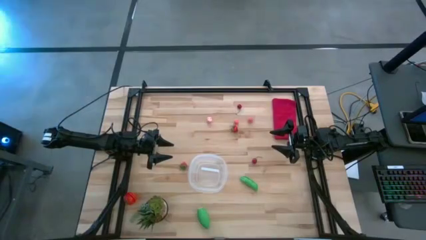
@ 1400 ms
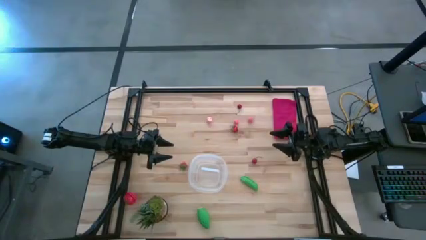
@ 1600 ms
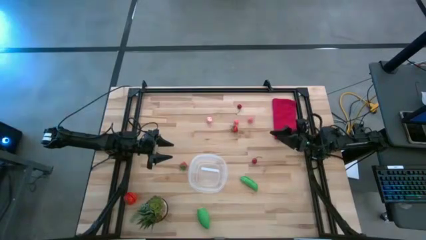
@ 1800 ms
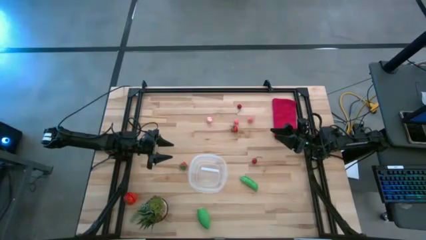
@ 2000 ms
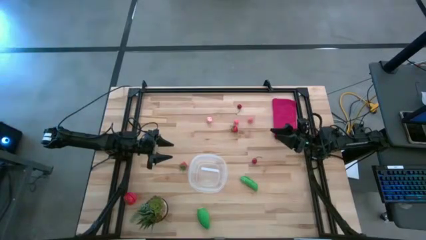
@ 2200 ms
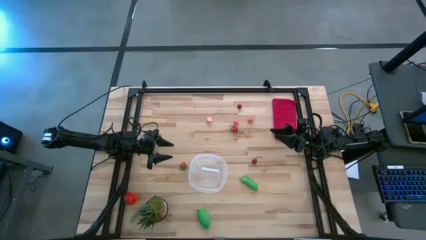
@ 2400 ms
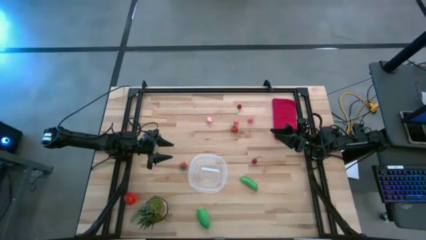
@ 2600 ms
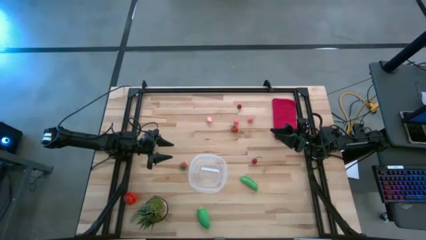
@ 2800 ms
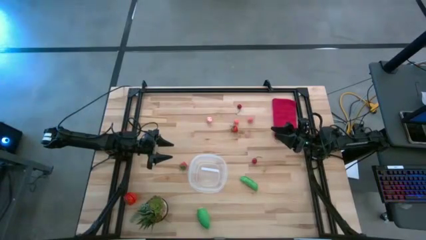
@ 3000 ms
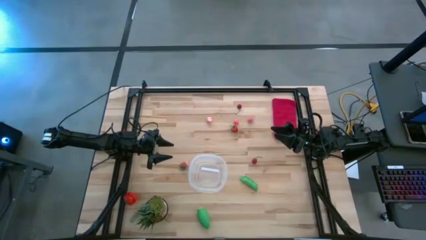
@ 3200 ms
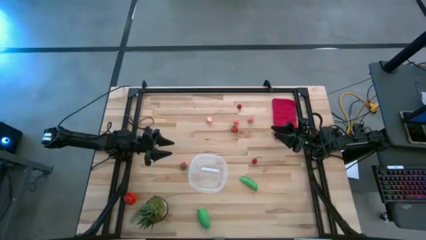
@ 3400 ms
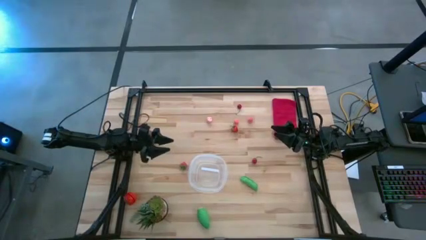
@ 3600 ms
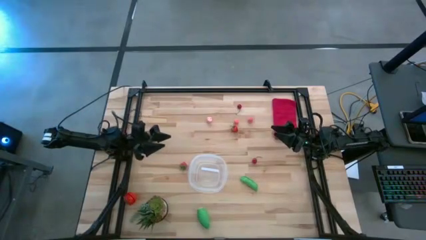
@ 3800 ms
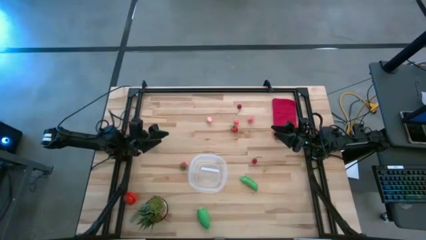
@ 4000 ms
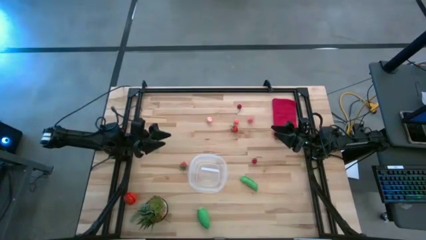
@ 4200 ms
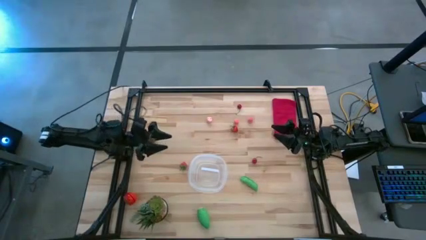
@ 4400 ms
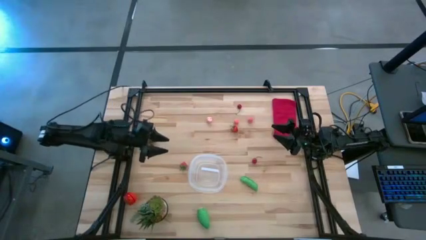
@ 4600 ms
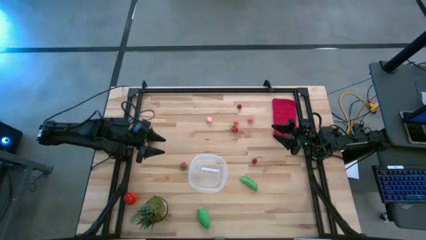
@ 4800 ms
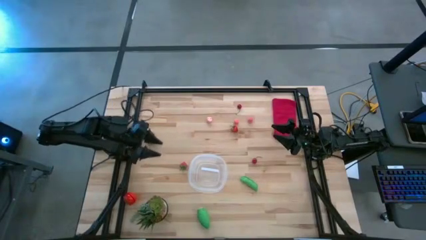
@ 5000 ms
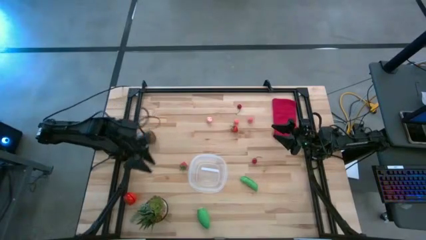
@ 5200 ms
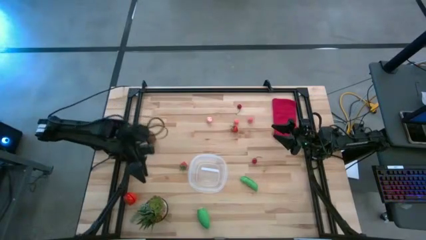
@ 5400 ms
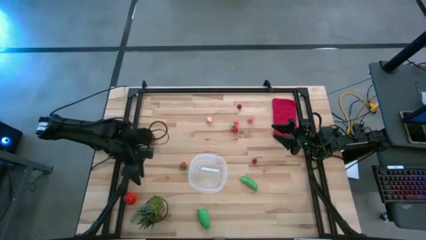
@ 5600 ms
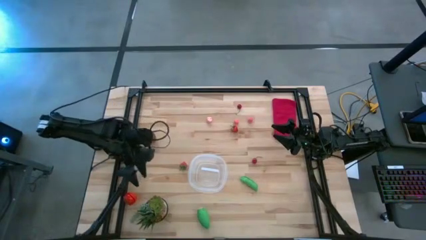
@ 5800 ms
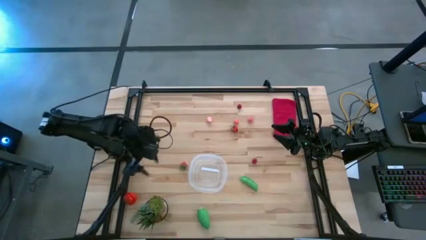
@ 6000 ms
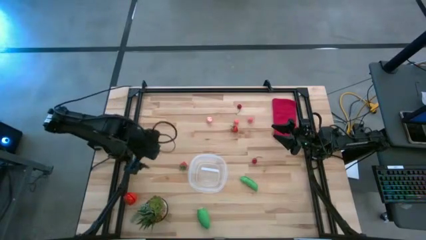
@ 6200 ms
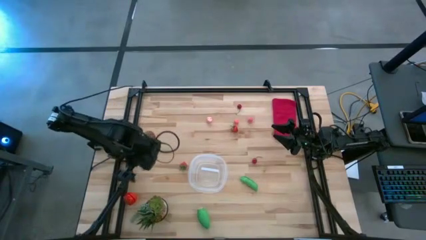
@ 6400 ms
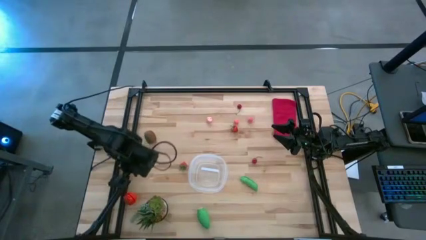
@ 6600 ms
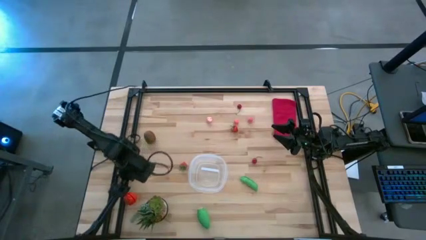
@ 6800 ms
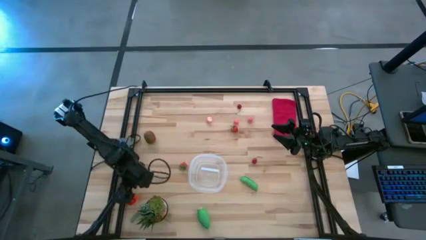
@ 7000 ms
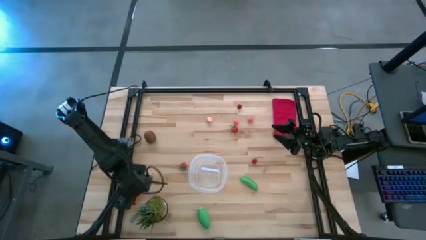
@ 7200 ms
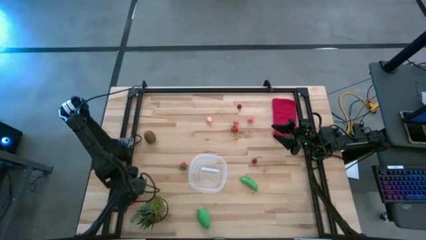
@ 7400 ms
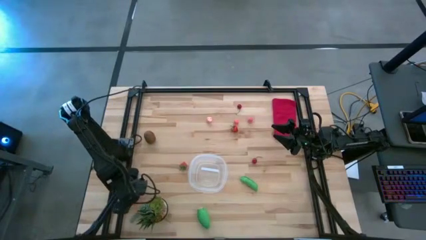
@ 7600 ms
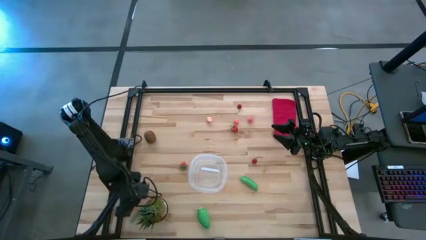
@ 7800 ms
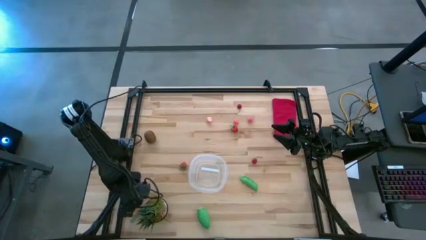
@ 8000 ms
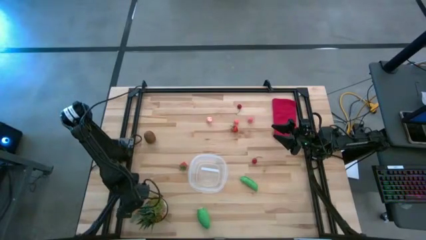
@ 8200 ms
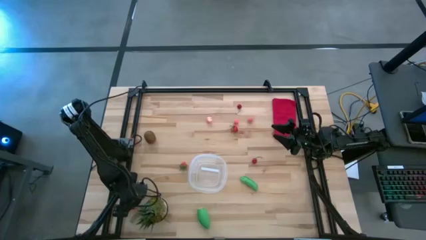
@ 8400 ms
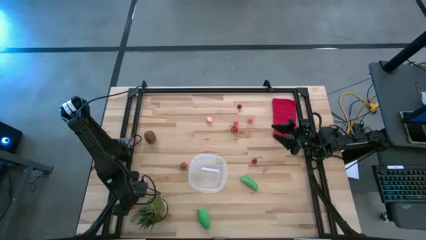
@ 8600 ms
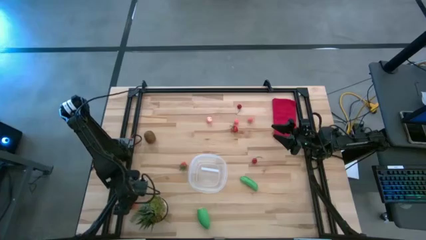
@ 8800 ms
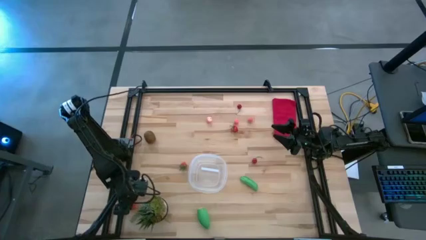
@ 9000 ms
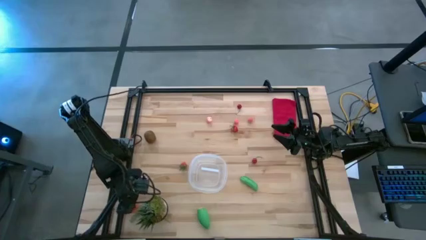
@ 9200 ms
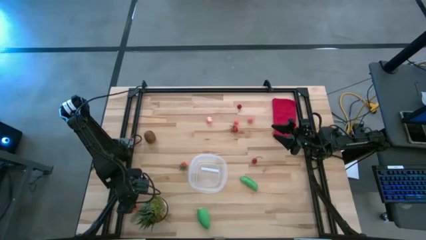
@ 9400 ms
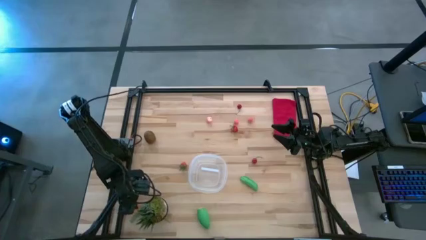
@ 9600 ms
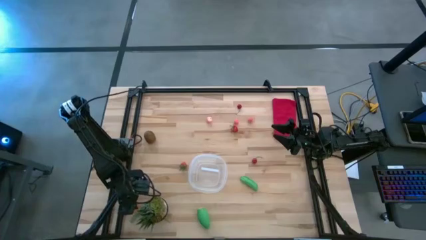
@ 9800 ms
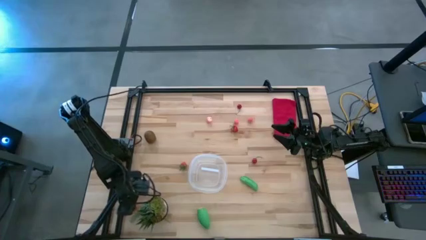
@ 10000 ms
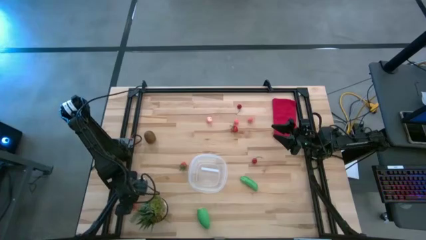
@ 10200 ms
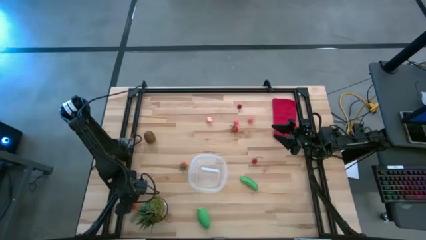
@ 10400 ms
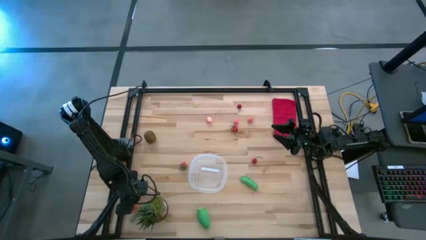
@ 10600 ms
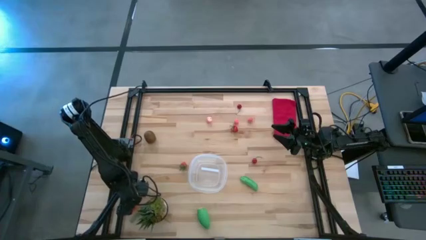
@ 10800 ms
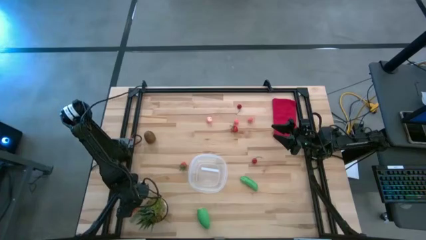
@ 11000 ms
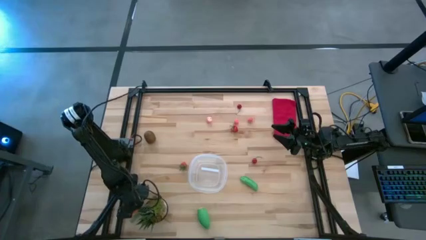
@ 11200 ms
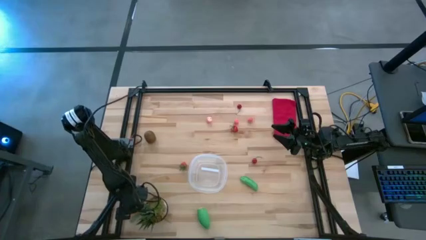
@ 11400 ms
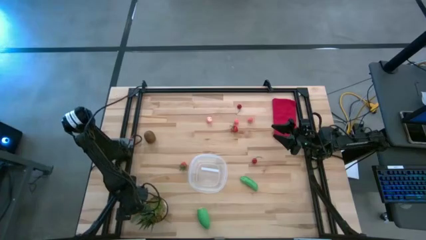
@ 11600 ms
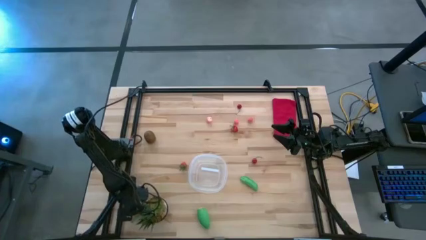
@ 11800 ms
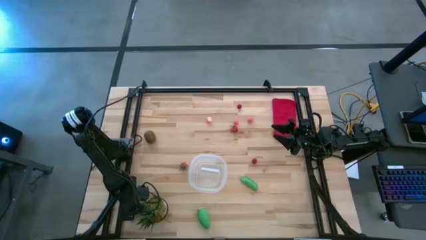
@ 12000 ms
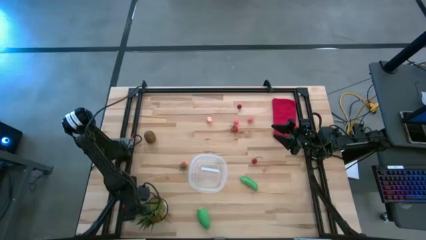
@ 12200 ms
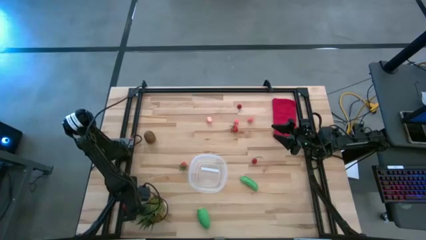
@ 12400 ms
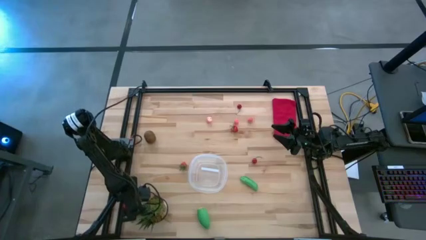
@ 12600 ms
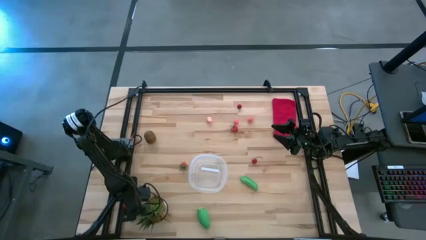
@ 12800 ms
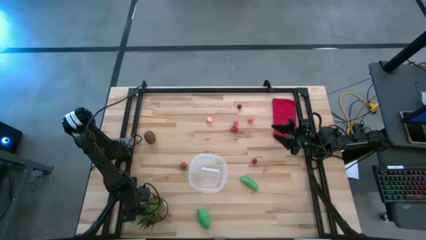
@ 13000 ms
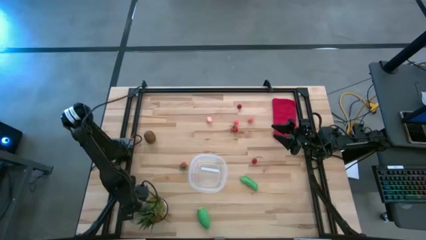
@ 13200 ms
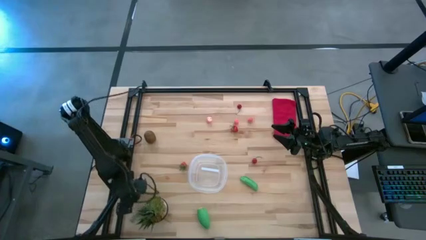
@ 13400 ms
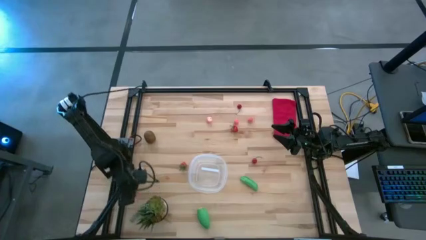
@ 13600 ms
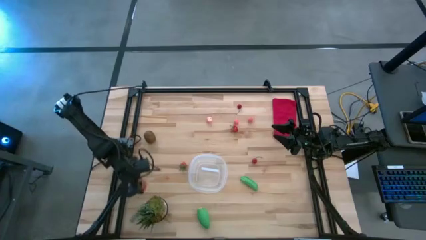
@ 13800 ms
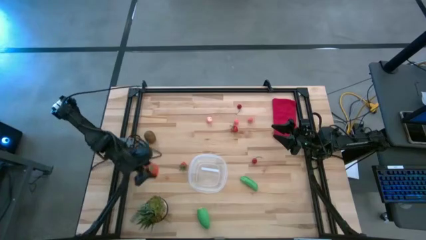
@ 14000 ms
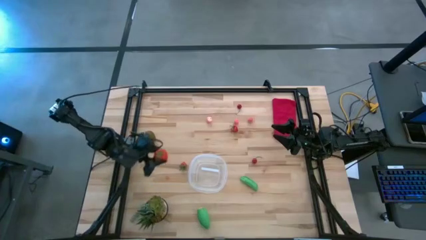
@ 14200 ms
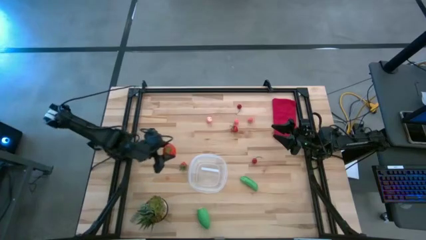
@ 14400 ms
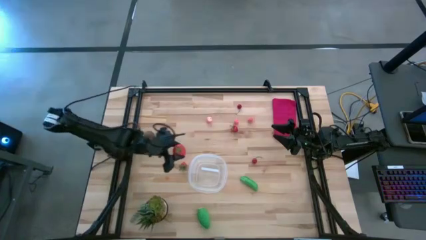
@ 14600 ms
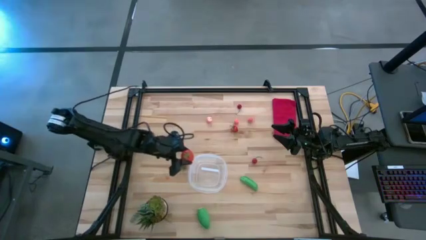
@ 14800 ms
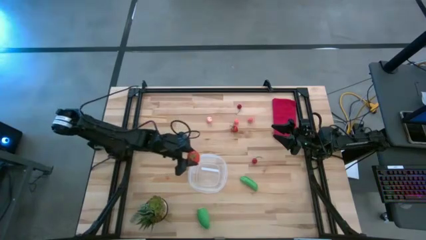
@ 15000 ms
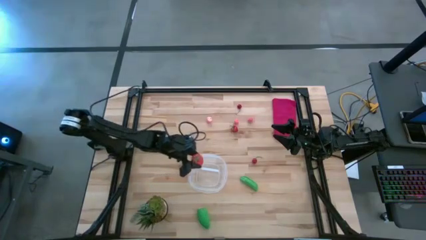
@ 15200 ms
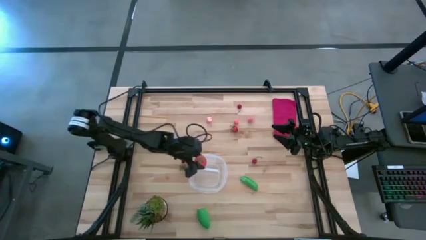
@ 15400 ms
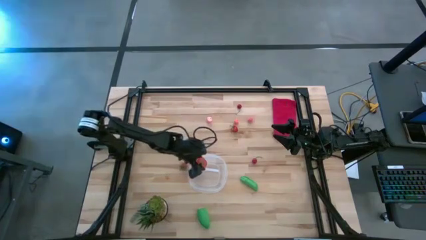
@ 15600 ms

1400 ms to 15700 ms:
Task: Pick and placing Produce into tupperware
Put the tomato into the bin
